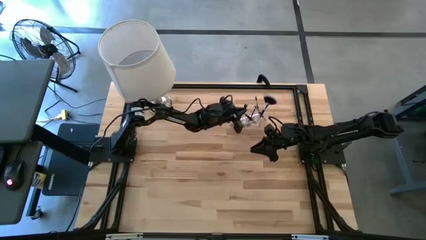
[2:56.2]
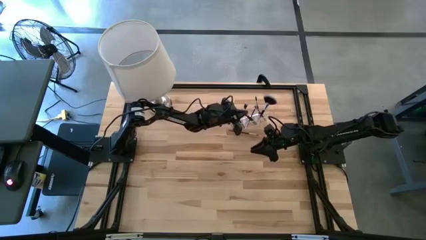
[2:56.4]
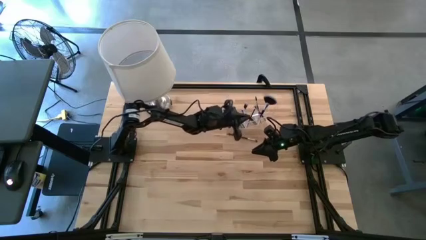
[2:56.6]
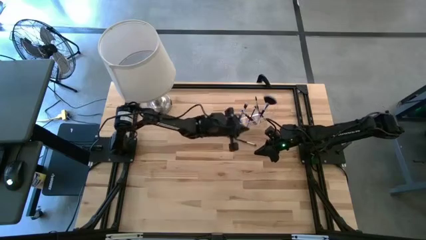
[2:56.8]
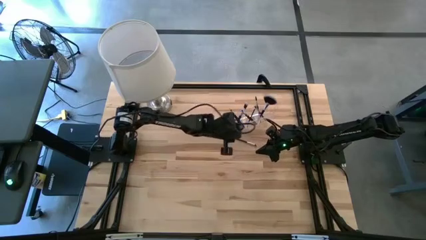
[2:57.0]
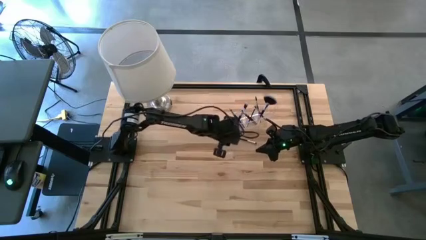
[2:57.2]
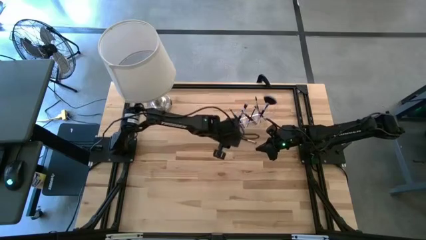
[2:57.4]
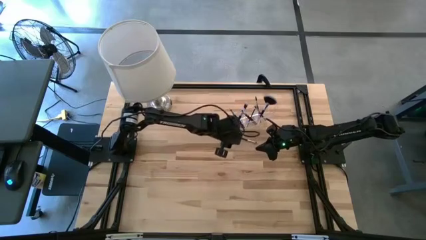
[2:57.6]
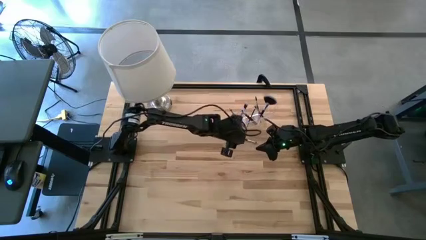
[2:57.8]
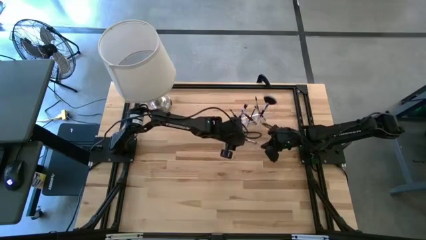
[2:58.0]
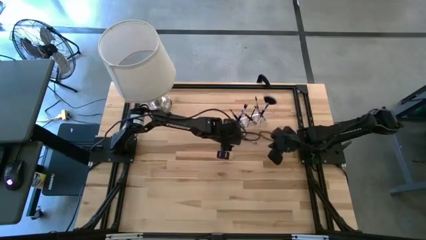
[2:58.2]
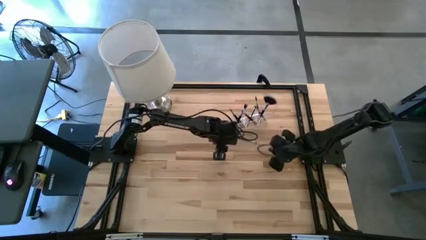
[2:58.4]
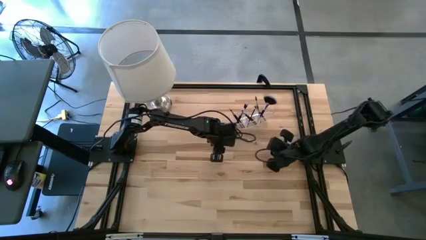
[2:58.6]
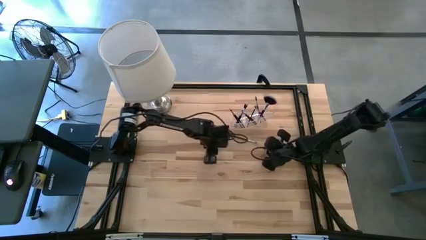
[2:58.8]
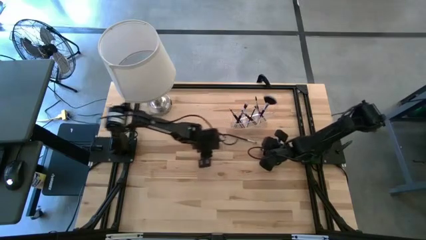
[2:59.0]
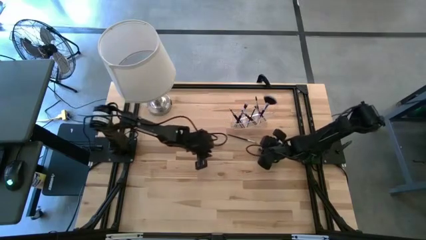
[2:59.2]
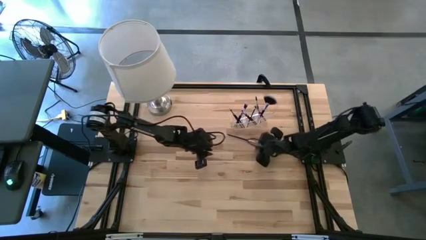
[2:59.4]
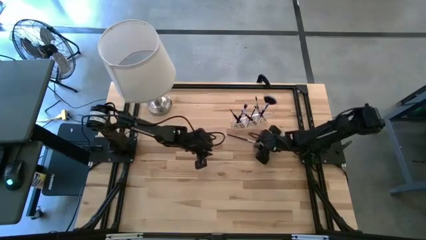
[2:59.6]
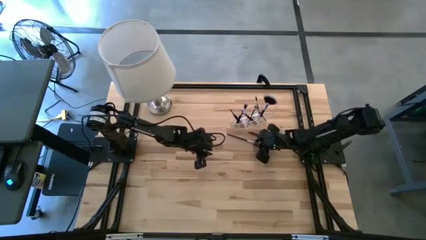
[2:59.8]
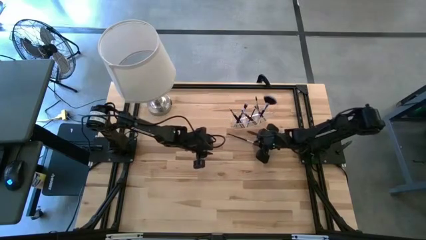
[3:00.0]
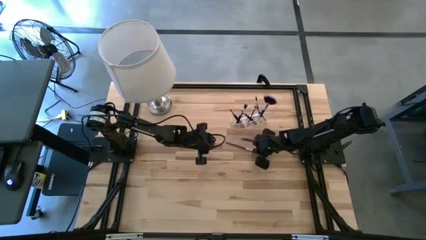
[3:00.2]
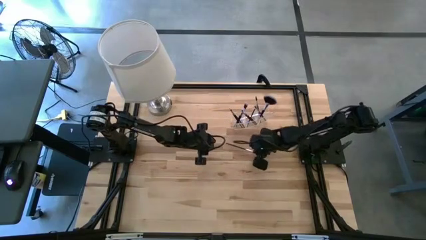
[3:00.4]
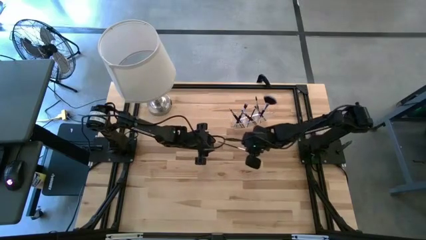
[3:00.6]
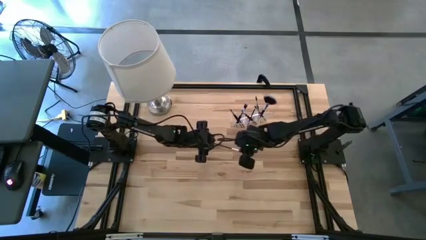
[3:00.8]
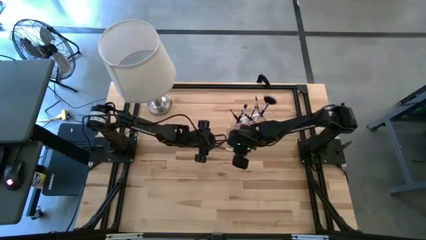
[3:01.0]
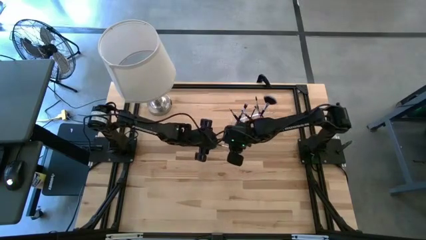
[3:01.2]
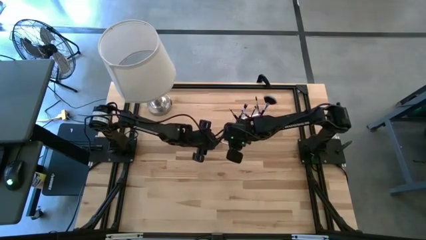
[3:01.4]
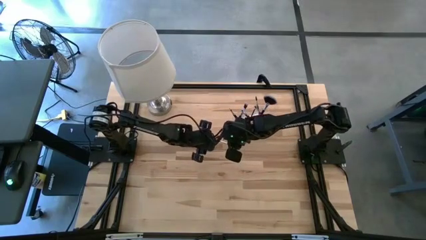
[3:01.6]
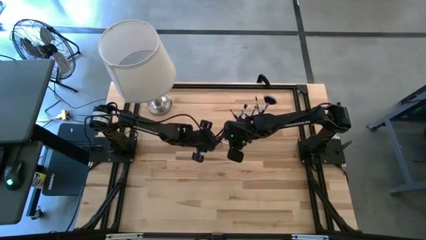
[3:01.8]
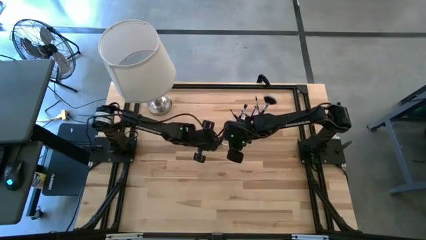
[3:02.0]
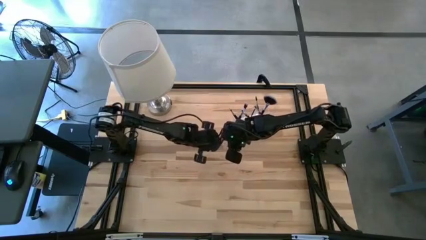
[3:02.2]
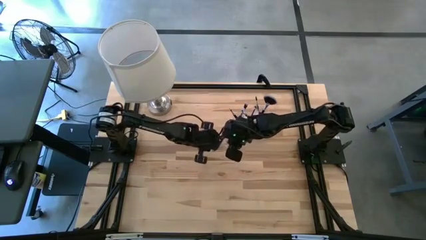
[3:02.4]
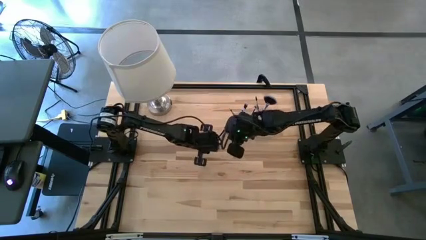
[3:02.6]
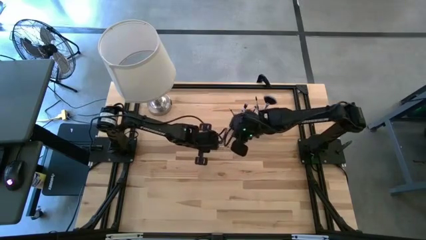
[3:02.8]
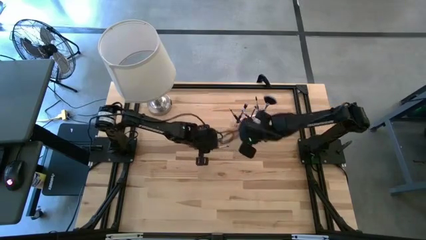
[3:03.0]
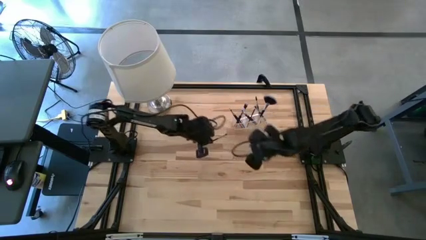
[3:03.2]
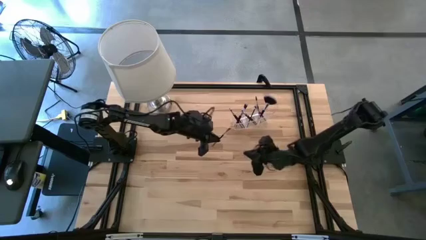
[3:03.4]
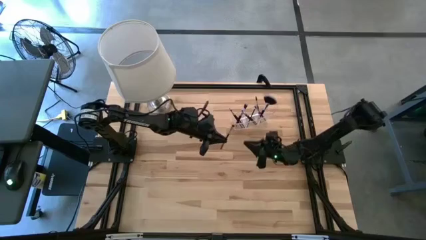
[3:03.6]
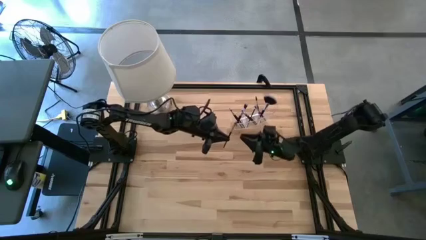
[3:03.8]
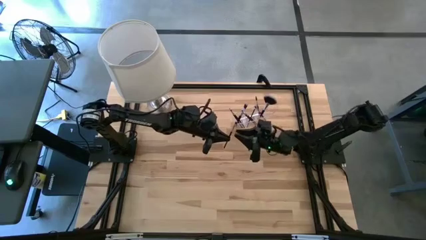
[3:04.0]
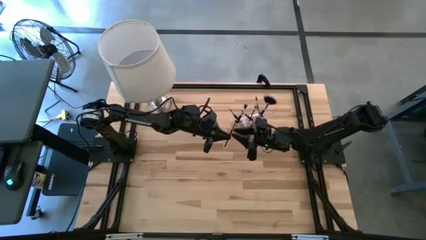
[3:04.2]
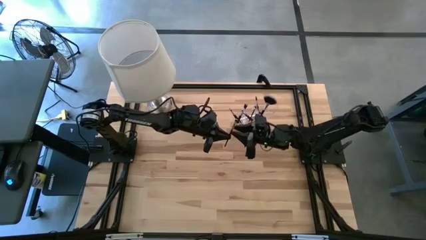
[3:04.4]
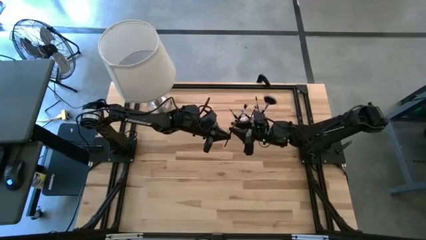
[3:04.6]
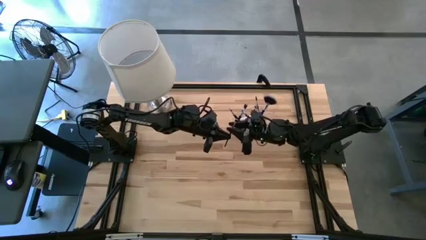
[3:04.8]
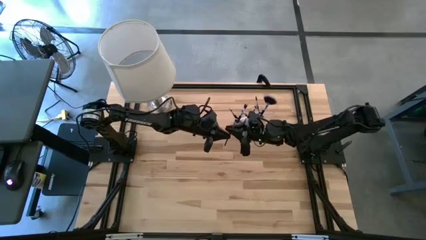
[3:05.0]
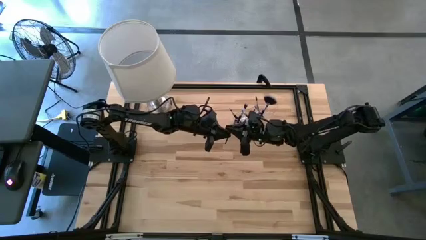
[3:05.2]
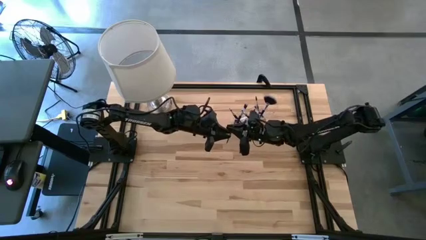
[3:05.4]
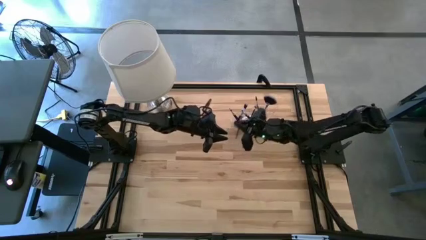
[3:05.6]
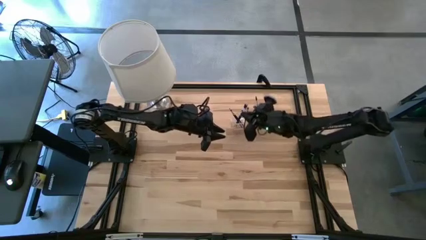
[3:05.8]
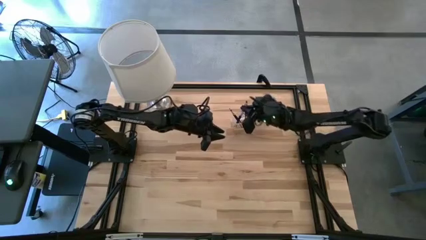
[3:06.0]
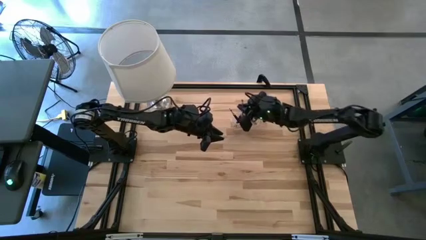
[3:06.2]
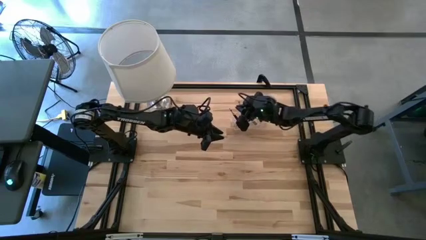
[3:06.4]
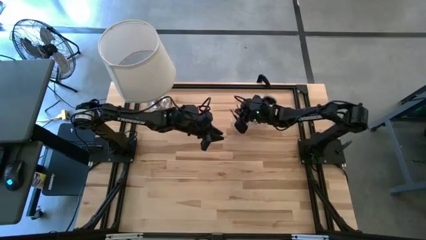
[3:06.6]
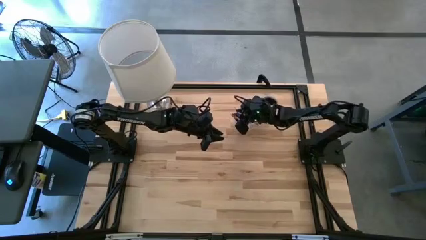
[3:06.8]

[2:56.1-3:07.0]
Task: Put items in baskets/containers
Put the eyeshadow brush into the transparent organizer

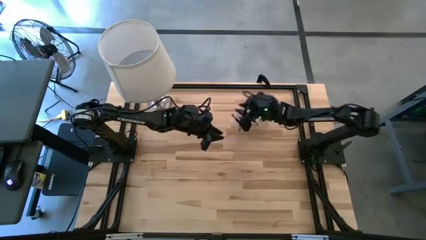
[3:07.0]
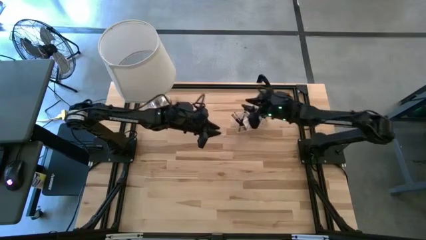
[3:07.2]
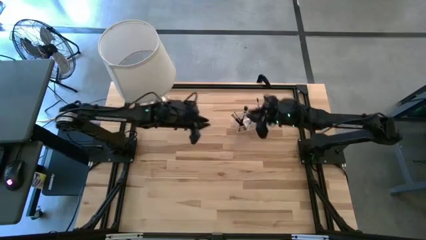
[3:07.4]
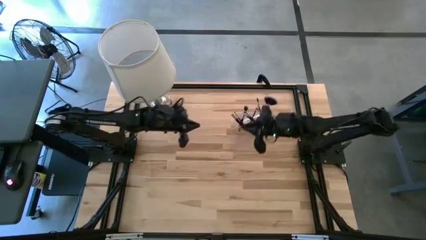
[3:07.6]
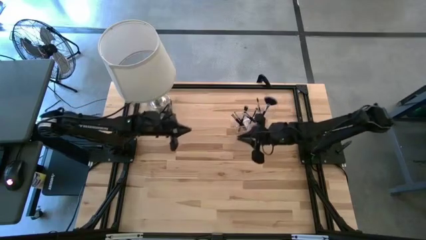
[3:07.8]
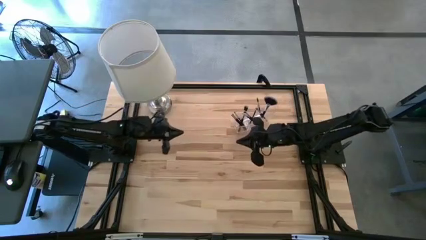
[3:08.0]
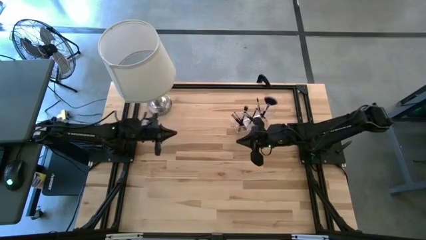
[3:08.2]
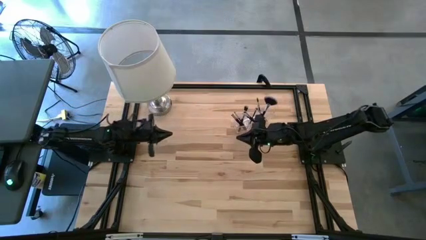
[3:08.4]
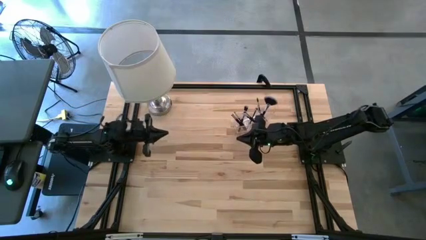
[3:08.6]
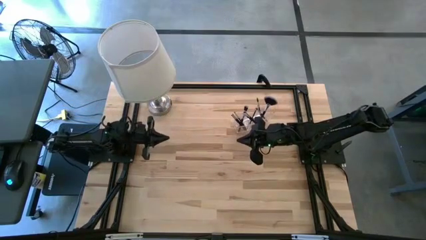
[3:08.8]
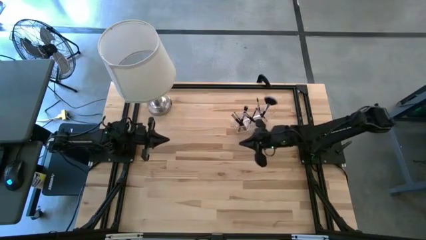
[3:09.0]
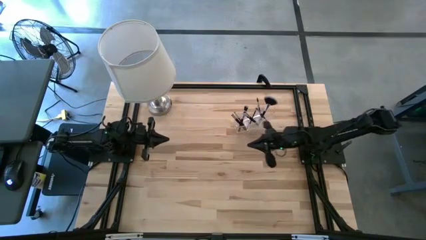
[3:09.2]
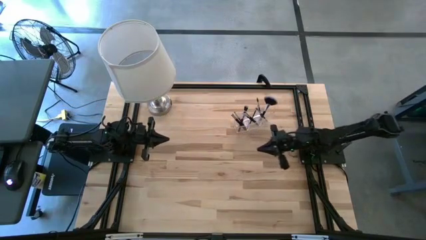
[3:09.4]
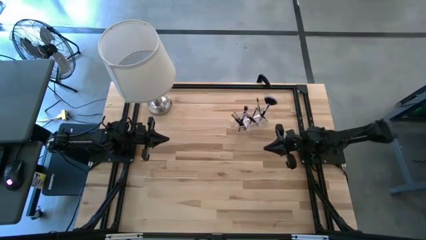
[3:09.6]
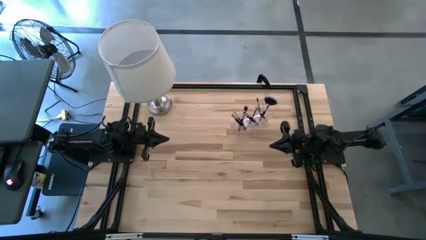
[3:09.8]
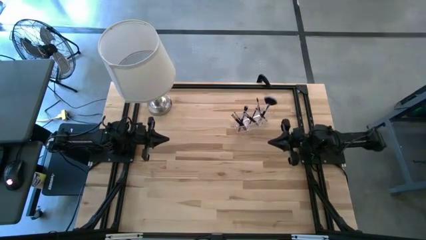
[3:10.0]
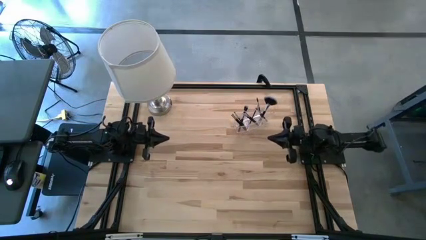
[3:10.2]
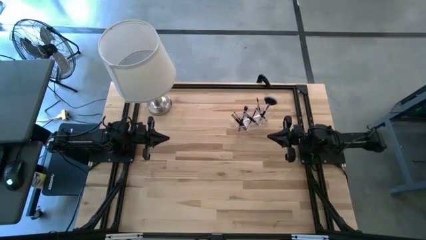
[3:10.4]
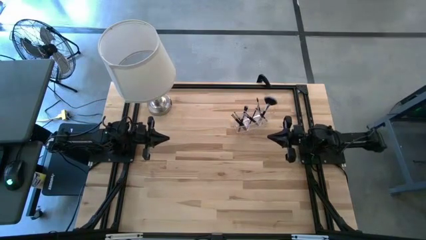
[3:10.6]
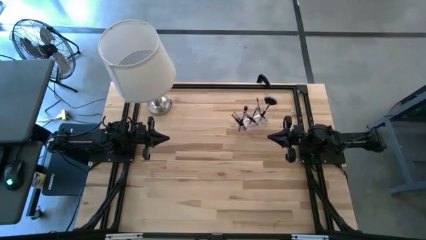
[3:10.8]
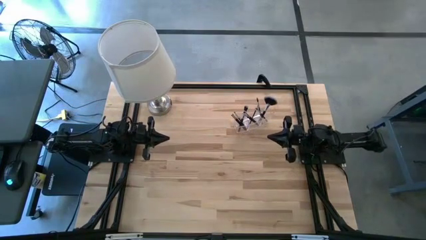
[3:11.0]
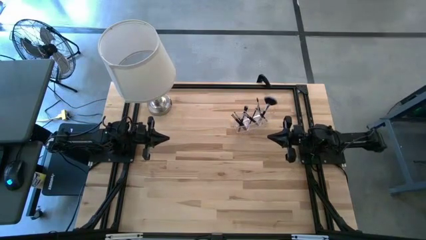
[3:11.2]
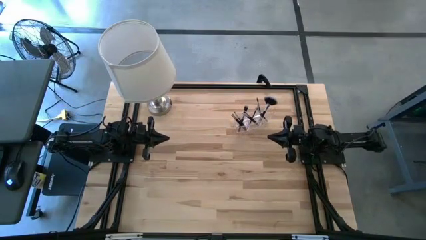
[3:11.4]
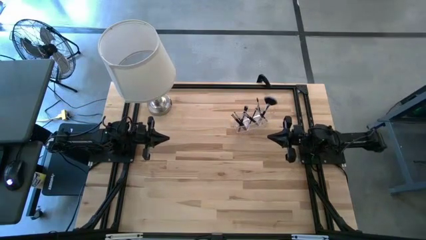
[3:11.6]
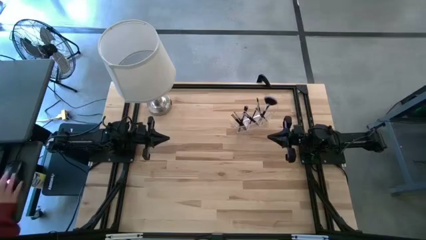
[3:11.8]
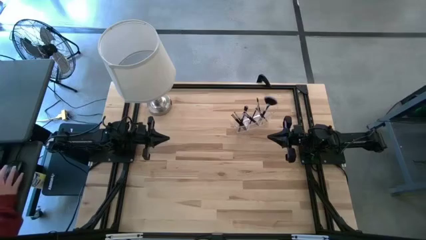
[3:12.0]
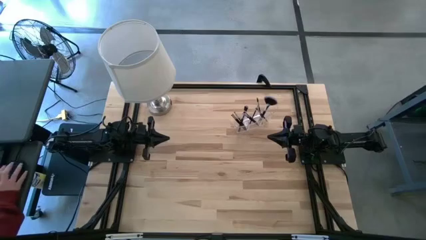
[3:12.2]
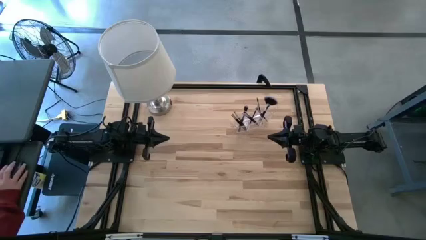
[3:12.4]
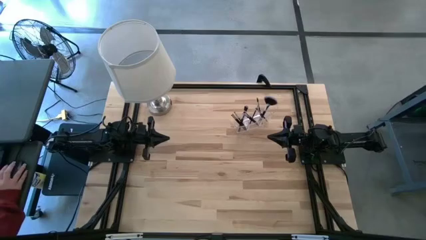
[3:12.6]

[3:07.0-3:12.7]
Return to Home Position
